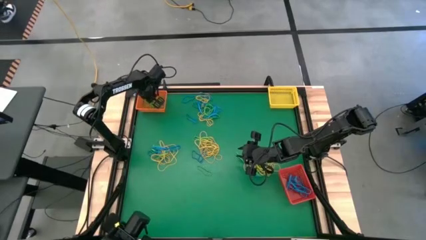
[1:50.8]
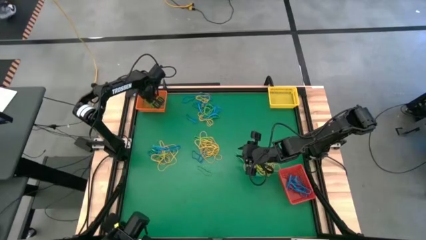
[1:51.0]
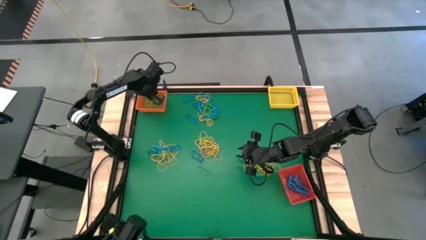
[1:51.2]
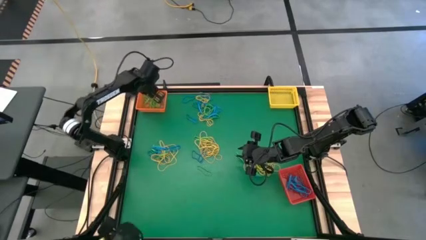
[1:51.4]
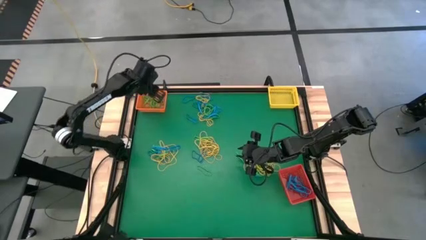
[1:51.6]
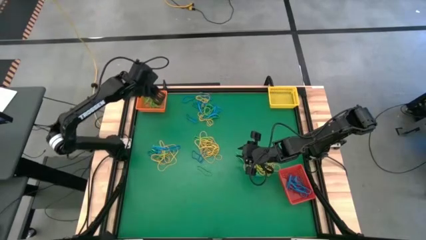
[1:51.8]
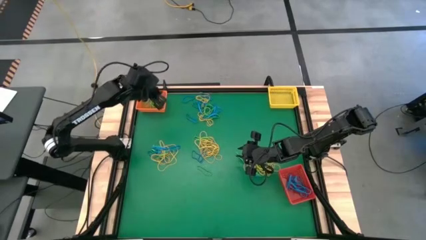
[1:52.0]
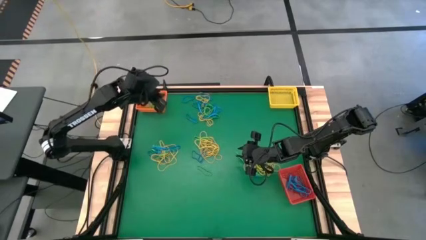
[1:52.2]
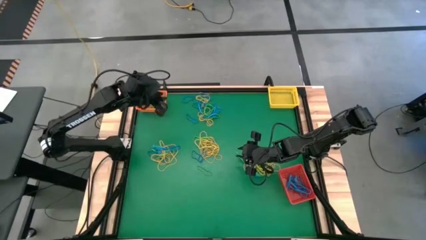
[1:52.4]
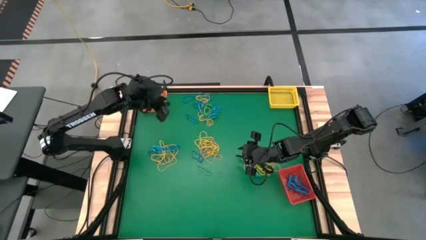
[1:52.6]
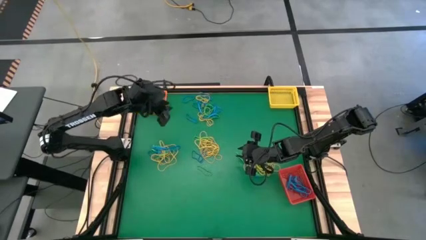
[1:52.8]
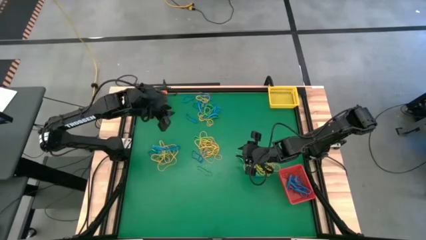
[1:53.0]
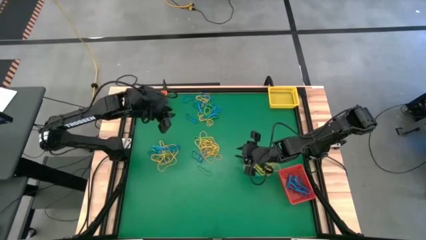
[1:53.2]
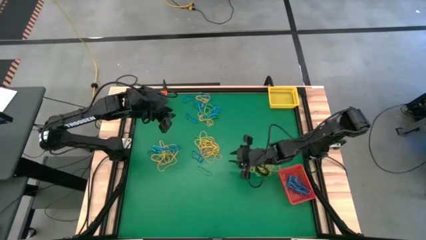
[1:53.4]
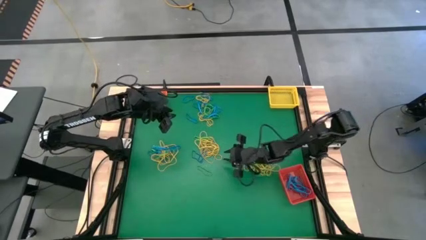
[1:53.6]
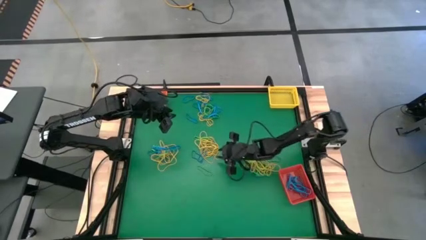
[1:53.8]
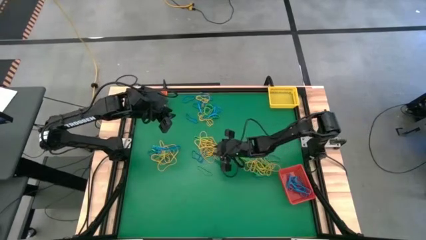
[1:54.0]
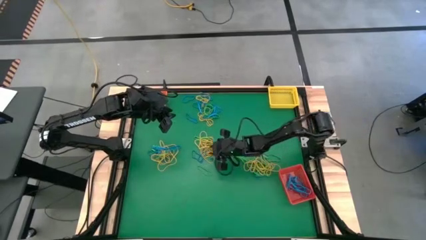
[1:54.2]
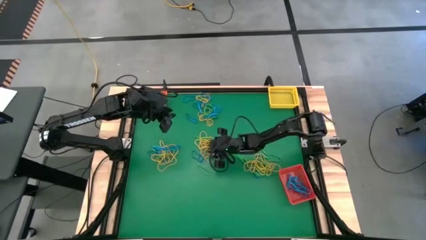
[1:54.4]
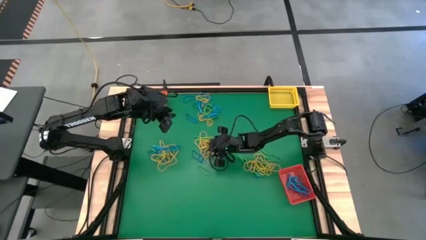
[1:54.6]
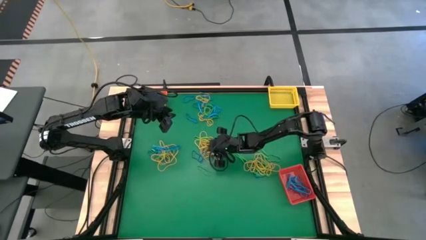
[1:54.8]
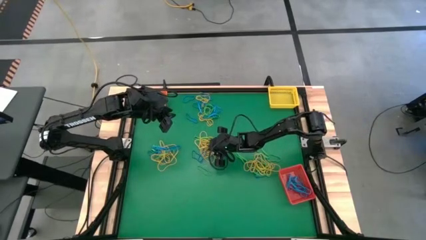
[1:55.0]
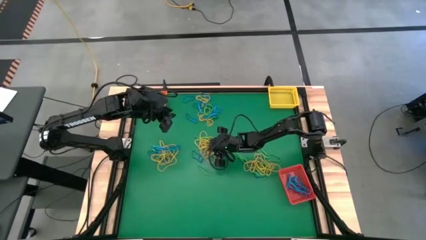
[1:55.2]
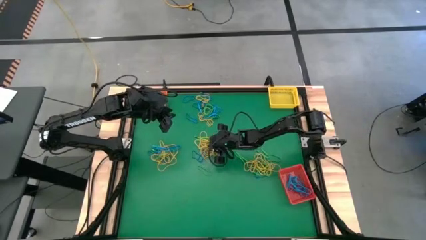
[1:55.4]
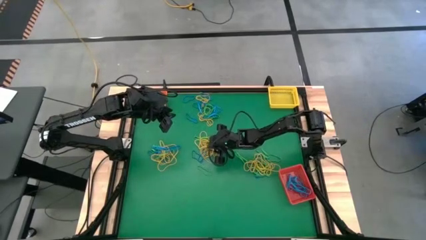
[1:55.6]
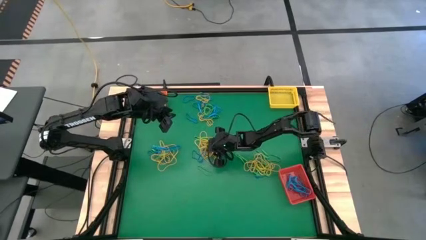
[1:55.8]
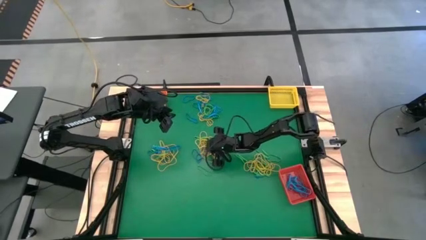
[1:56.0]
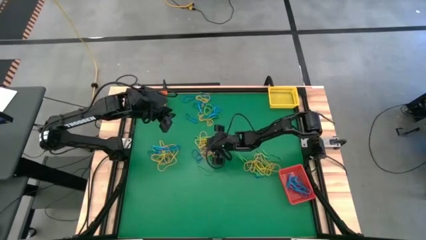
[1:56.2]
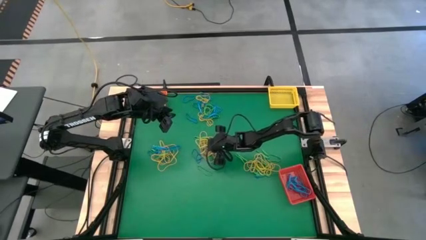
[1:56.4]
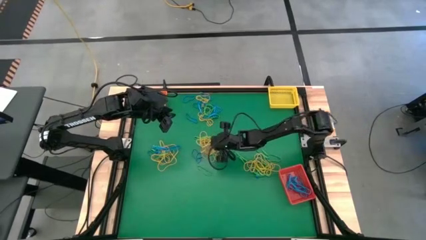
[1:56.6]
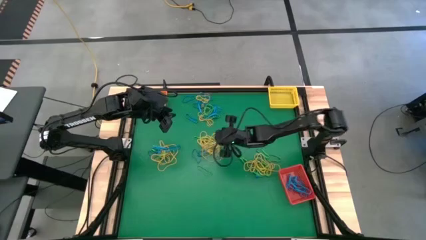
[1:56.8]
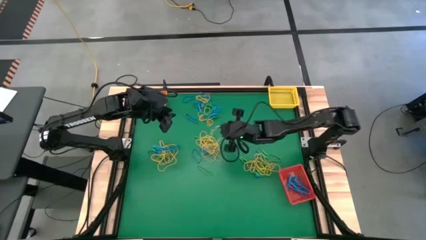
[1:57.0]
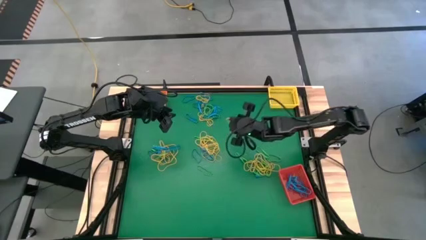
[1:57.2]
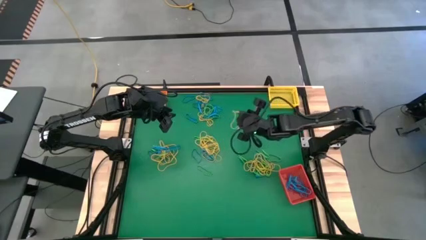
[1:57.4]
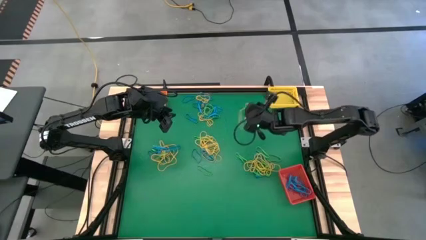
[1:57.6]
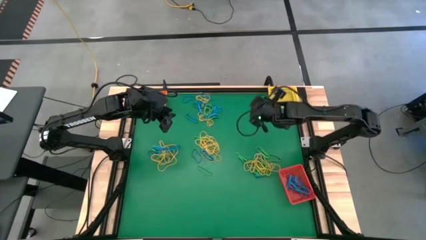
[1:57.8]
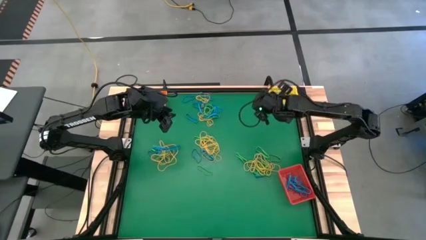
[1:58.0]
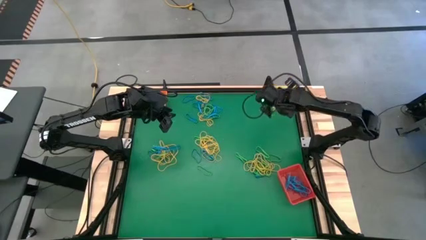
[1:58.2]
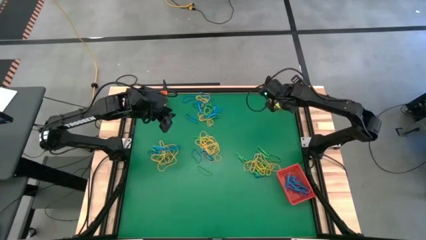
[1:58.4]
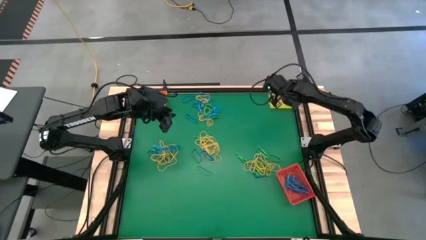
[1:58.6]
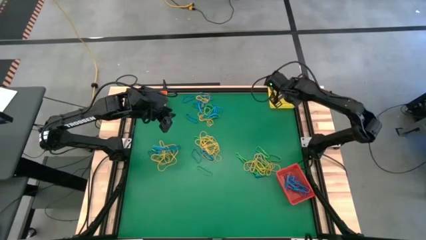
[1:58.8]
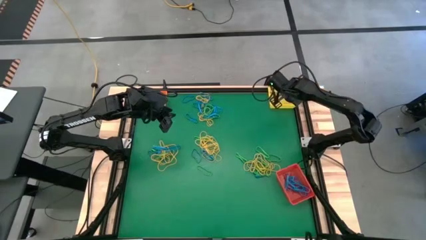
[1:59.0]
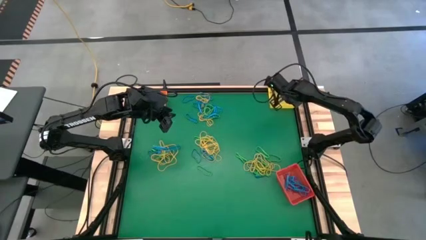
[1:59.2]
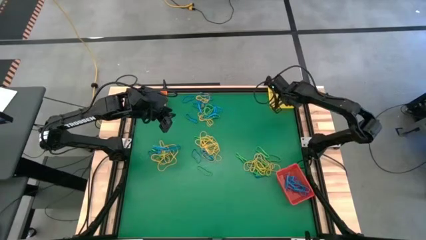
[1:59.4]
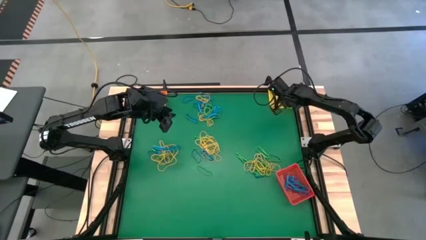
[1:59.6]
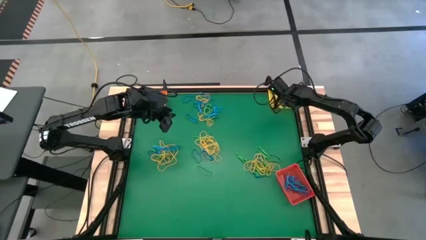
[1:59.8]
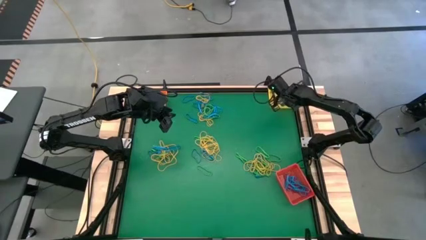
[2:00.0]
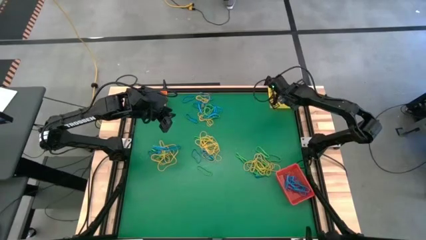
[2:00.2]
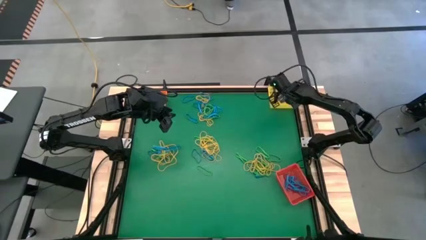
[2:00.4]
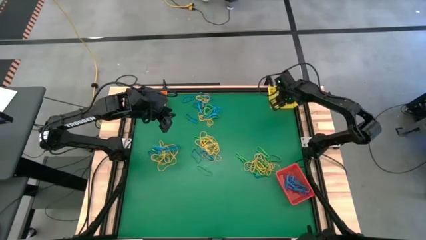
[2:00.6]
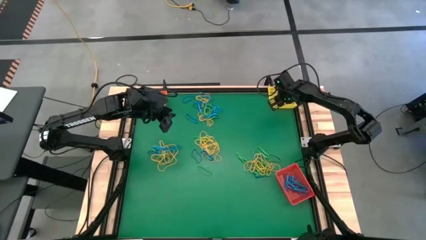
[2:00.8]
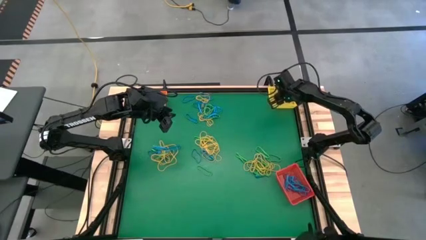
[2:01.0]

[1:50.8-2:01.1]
Task: Sort rubber bands into baskets
Put the yellow rubber band into the yellow bin

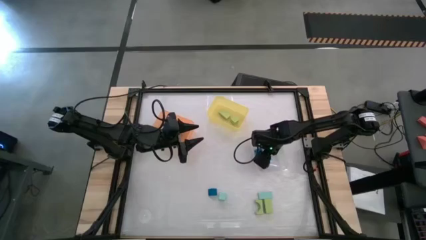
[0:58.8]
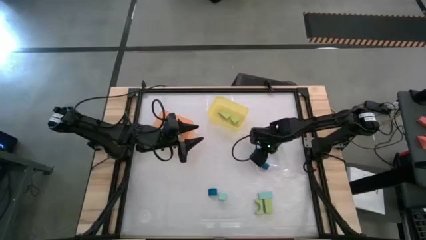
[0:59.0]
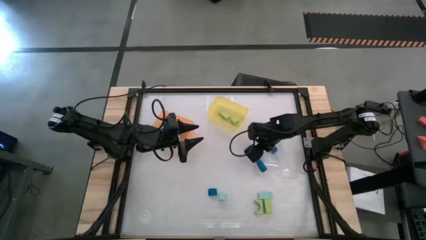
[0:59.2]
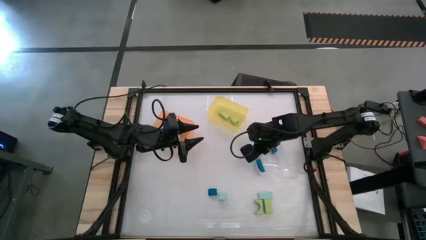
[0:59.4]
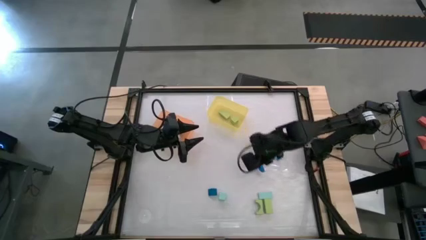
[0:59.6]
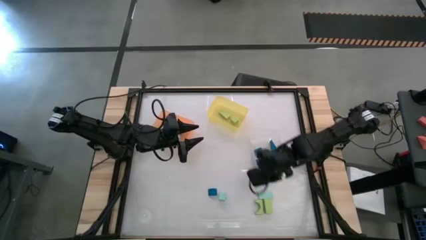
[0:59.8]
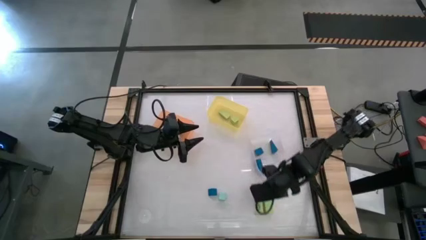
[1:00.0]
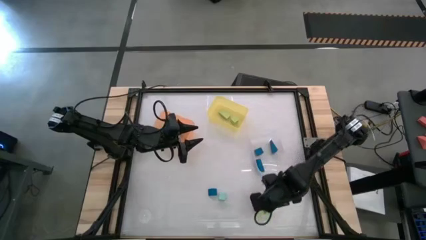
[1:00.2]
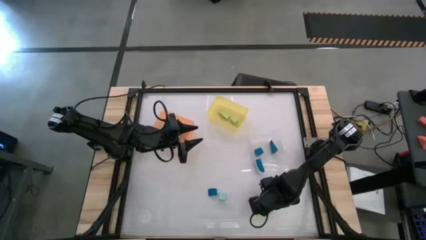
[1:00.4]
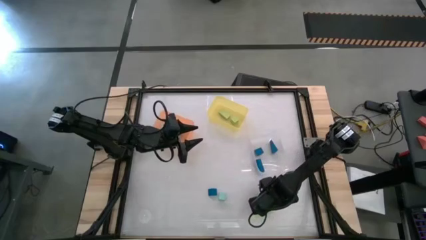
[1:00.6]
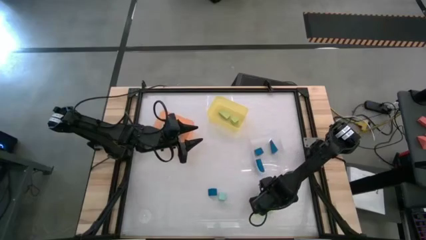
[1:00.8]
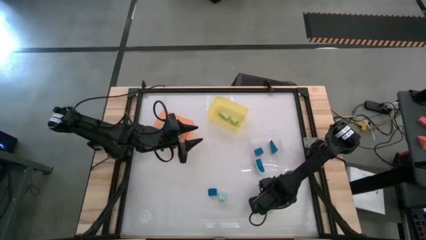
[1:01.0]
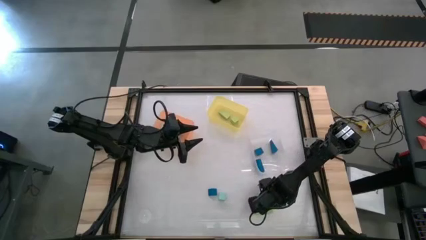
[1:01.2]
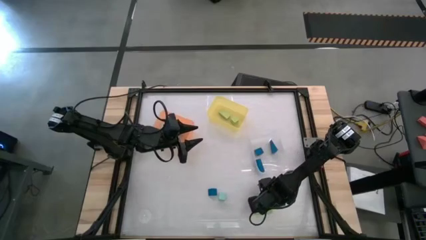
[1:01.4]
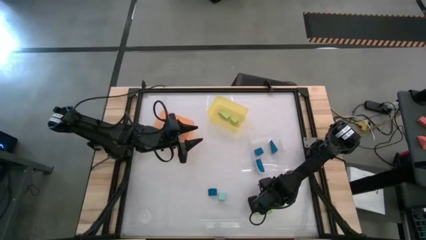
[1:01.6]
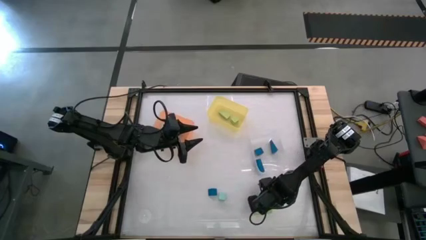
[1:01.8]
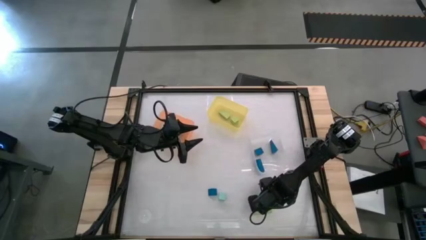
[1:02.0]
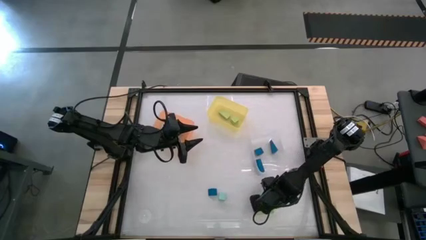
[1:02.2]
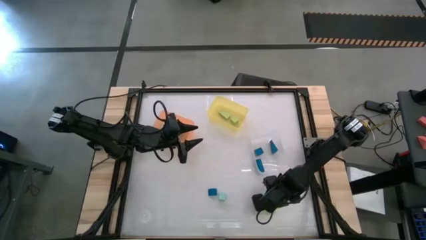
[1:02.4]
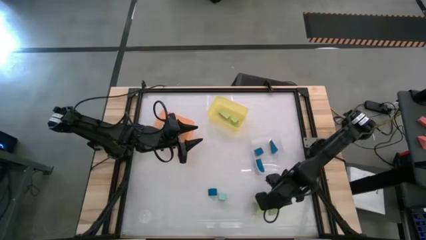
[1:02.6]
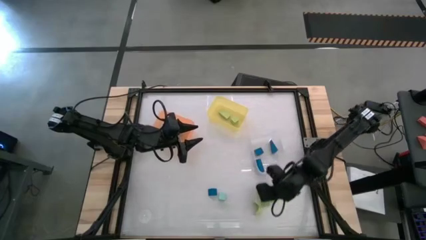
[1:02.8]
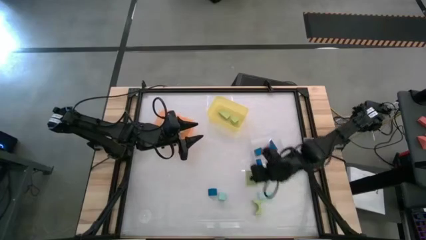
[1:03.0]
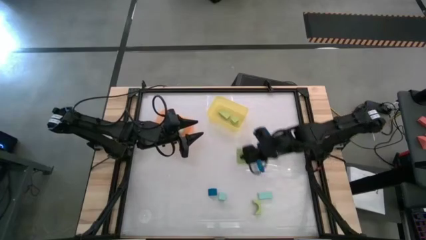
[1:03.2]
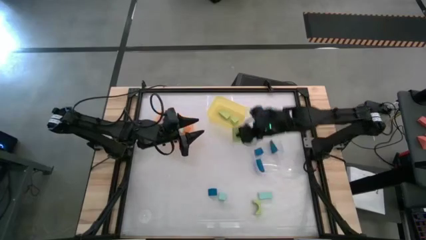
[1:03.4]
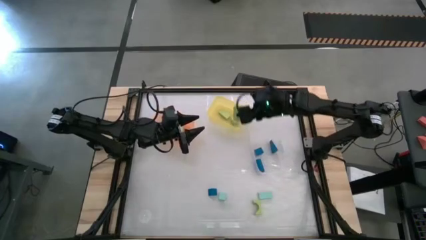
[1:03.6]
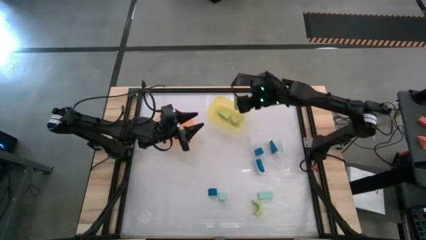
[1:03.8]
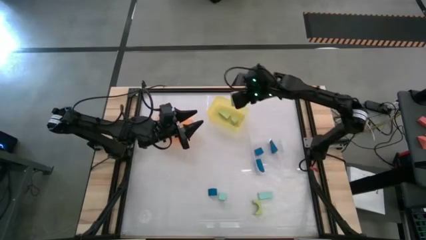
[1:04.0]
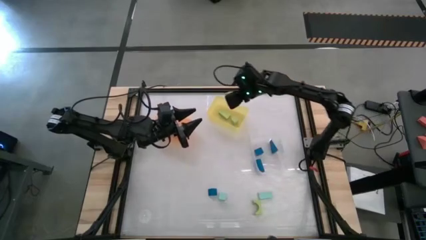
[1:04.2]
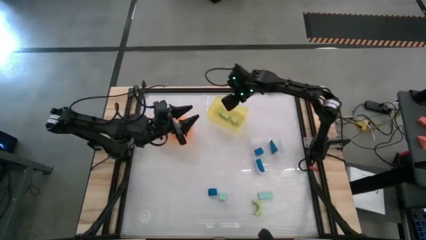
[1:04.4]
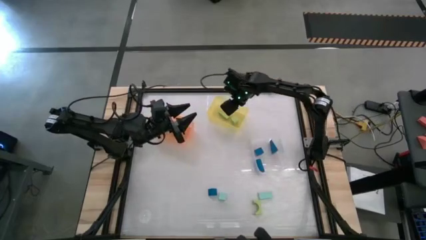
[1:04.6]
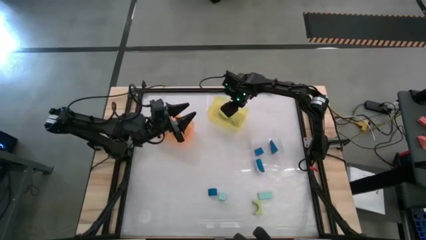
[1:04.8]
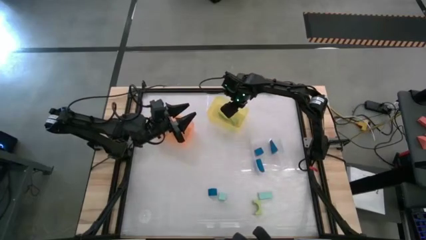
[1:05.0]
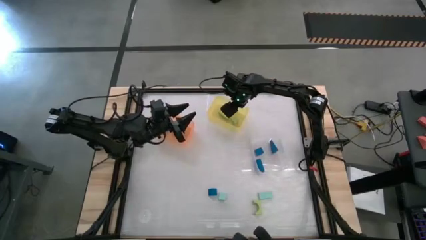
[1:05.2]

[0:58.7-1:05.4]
Task: Sort & place blocks by color
Put the light green block into the yellow bin
